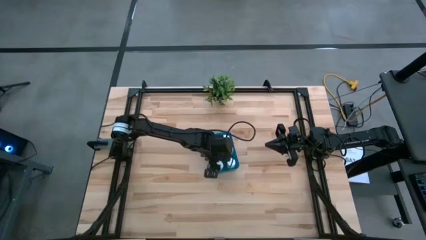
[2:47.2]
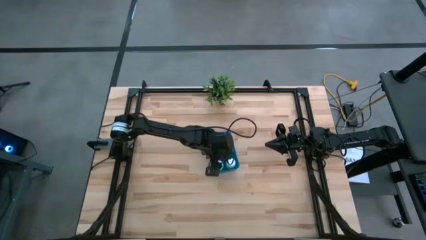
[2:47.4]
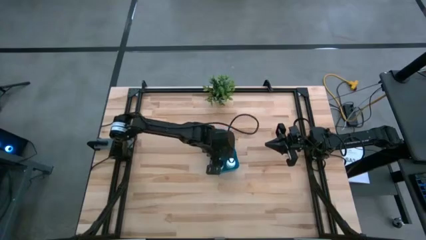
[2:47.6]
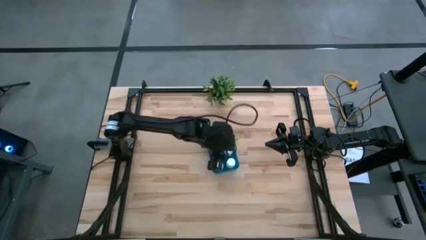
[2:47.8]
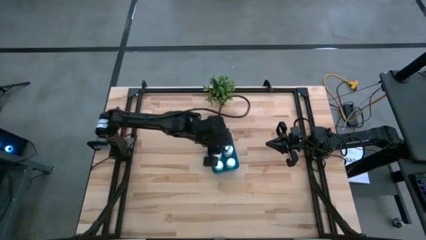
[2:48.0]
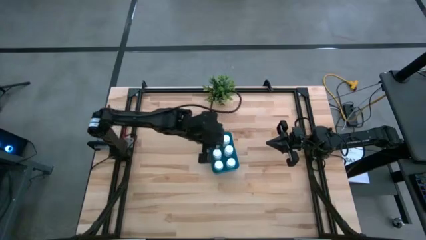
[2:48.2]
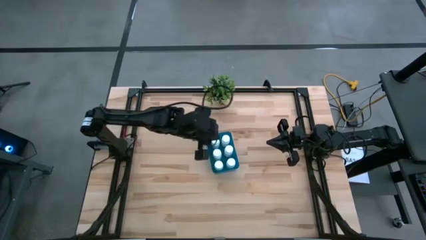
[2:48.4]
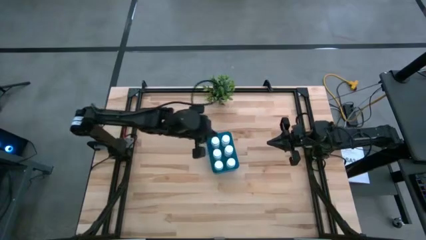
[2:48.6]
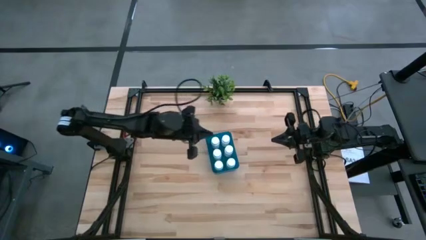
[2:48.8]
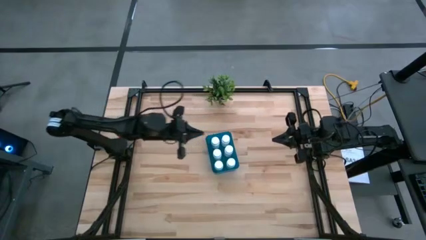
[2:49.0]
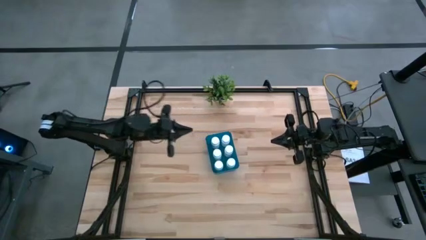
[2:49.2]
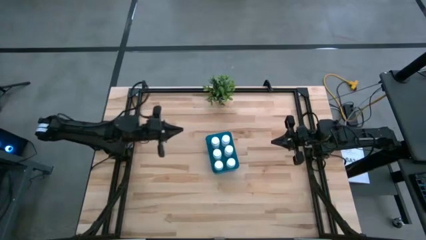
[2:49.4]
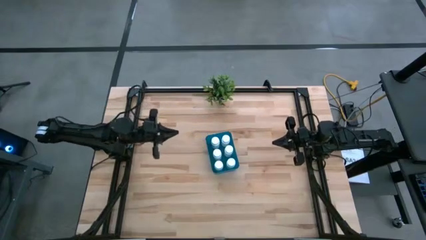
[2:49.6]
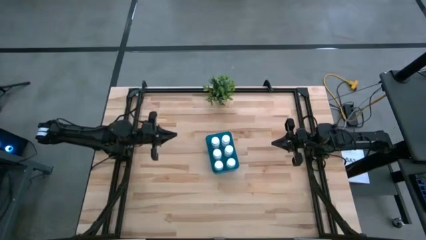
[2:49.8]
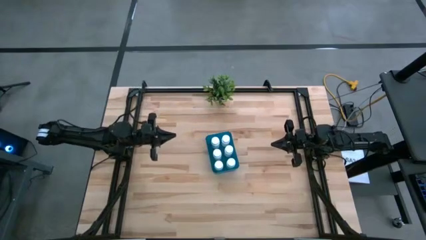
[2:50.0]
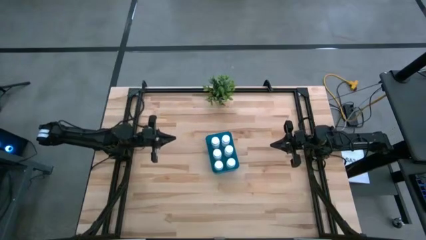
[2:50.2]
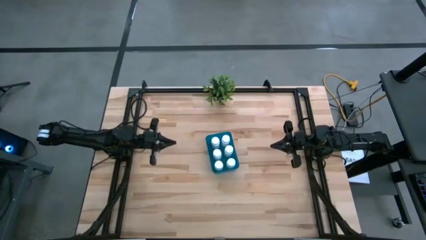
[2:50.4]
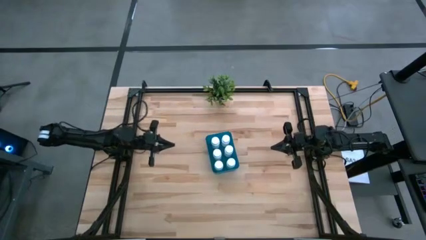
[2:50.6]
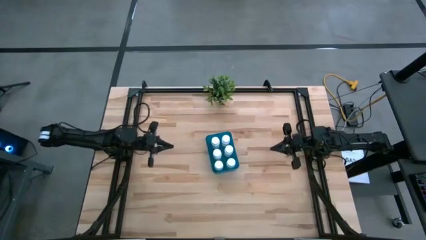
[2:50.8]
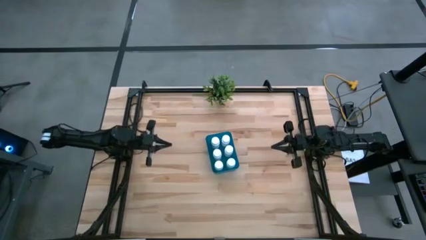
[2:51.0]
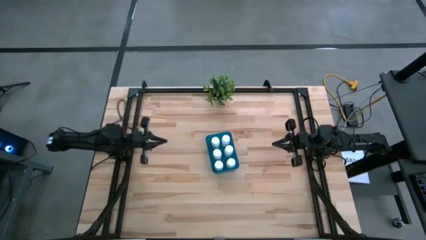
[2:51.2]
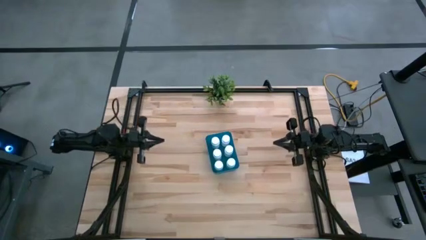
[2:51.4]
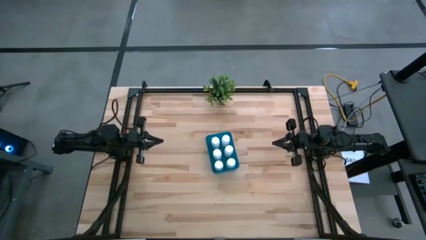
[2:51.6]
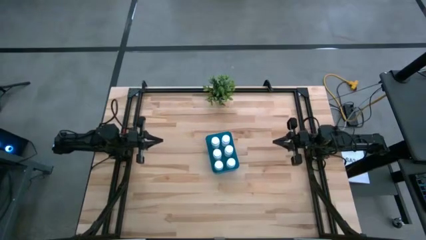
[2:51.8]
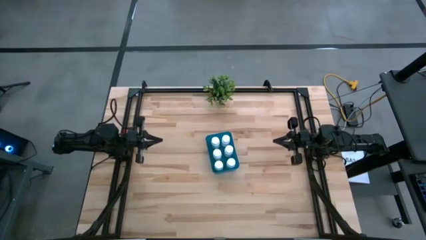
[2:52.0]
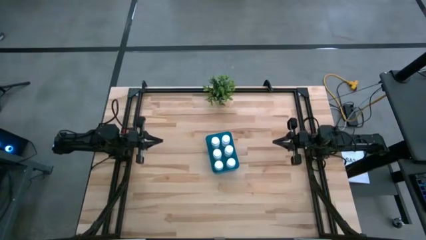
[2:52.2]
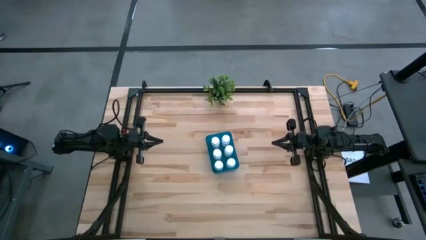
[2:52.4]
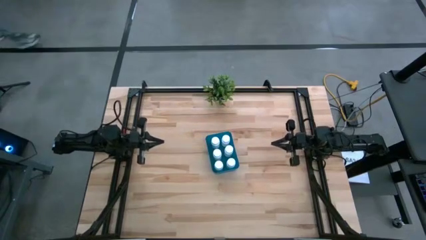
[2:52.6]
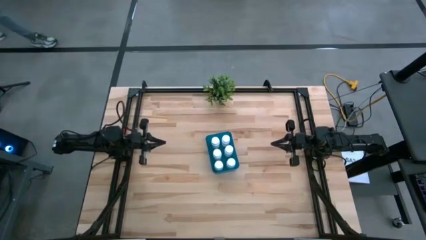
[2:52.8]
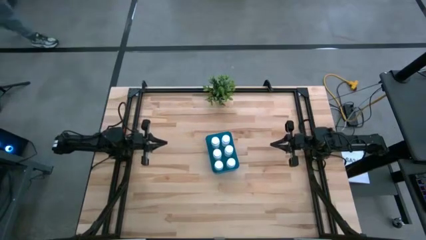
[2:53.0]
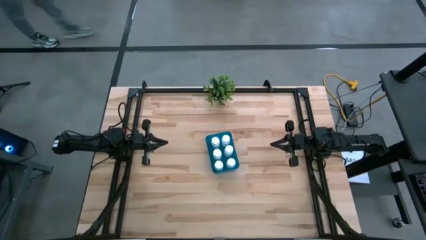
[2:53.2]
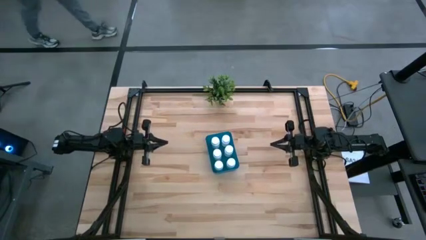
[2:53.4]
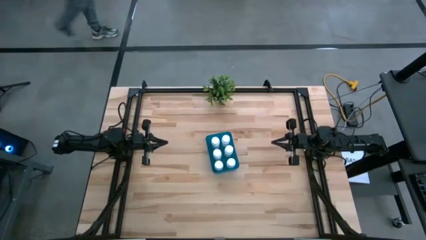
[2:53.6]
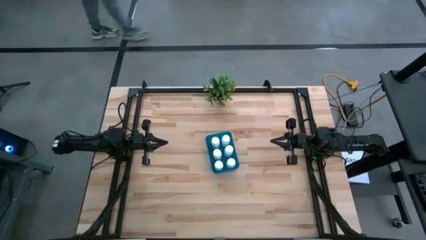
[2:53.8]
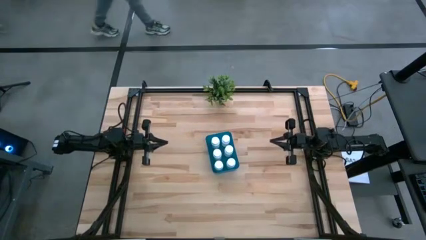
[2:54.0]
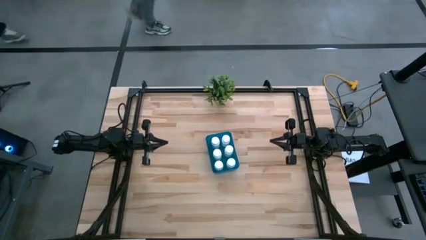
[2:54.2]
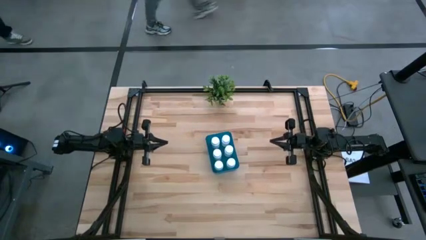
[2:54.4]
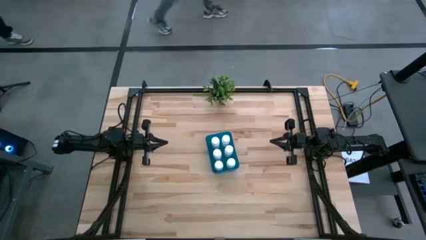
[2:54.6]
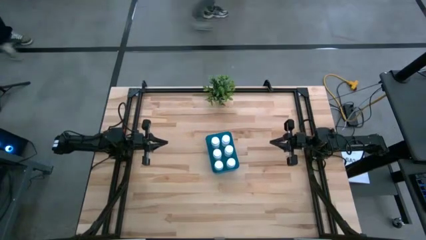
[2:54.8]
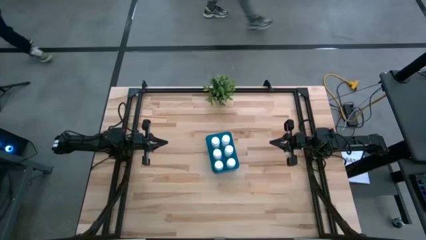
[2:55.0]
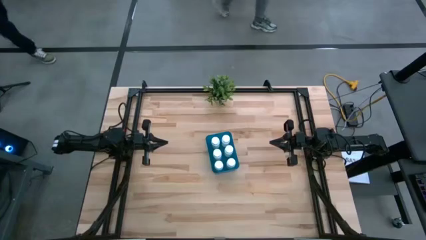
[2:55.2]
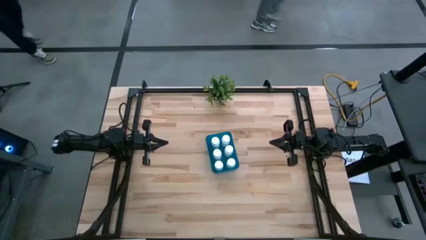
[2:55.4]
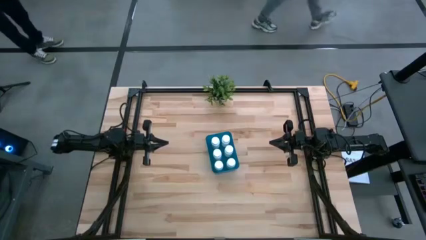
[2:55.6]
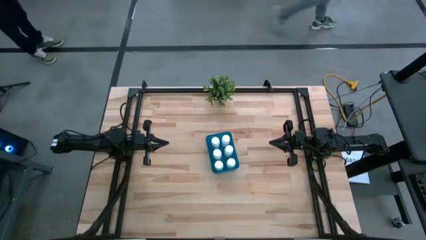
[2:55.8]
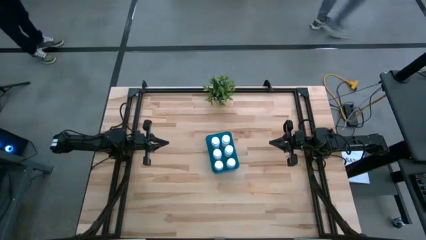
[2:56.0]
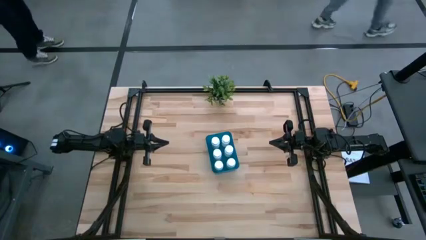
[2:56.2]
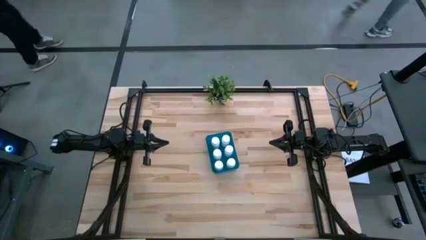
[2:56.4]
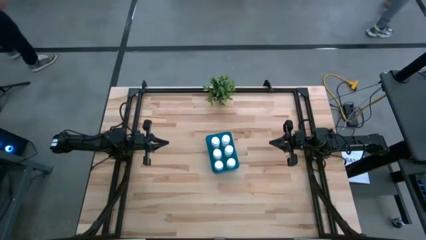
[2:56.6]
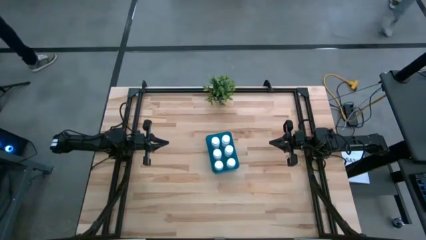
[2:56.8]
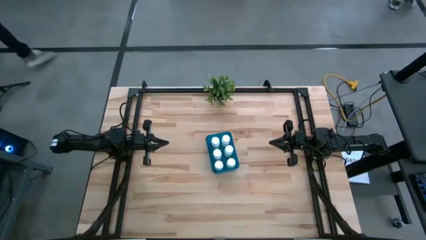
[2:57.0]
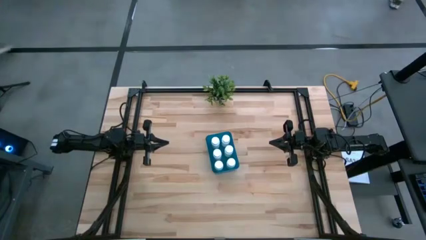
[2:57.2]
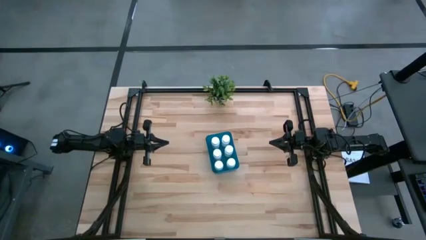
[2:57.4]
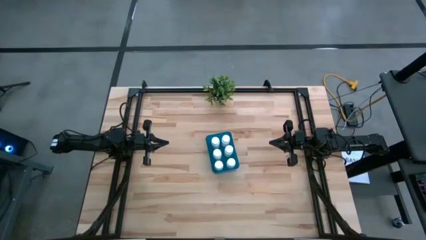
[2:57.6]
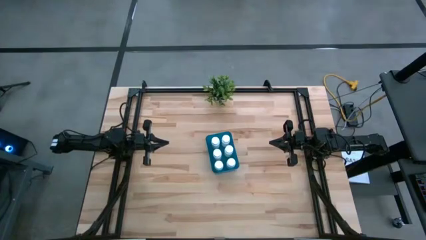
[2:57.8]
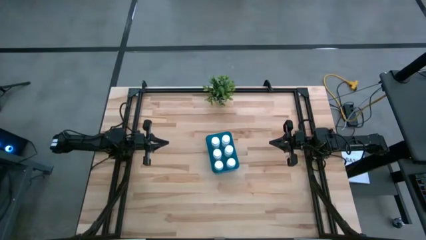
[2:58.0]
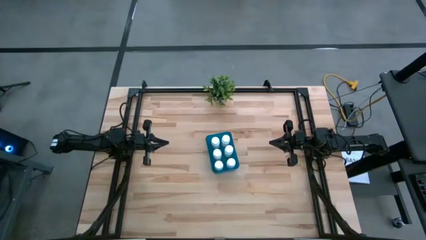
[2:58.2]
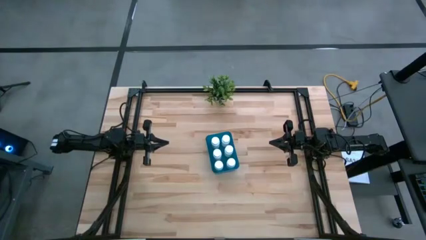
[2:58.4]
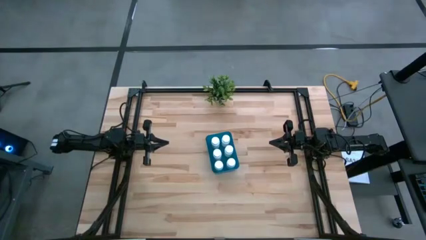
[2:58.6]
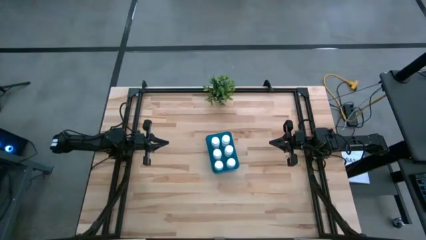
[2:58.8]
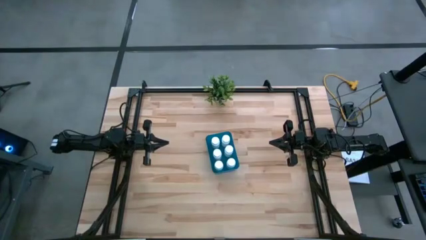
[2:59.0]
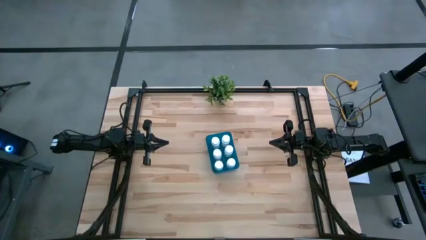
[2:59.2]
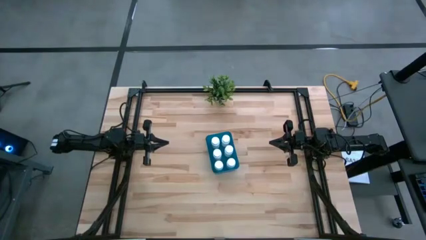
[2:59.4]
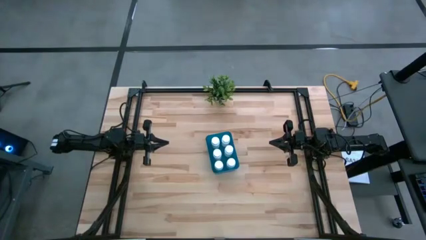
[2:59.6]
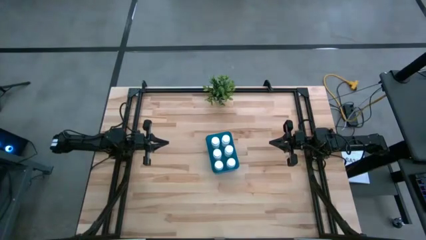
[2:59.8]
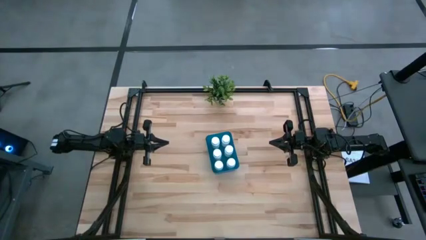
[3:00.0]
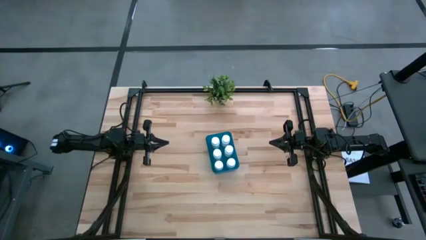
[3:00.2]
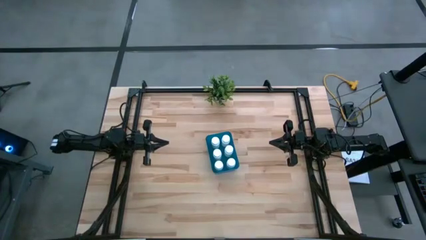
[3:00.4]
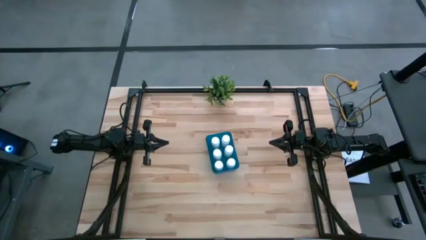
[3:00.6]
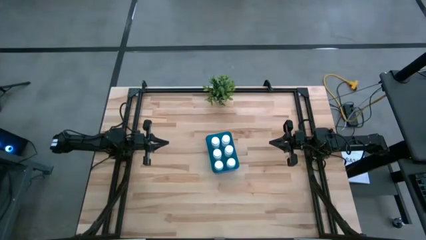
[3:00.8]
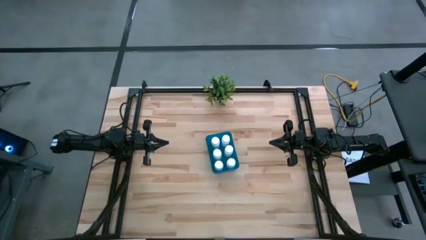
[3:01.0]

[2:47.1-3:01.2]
Task: Pick and place pill bottles into a basket
Return to Home Position
